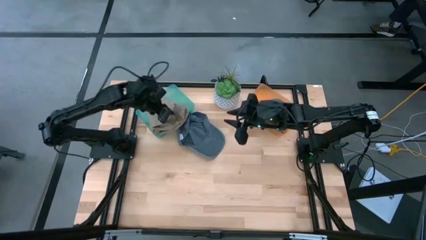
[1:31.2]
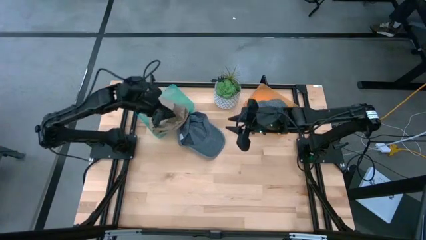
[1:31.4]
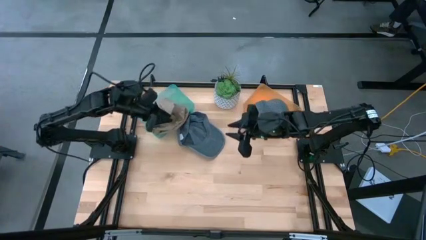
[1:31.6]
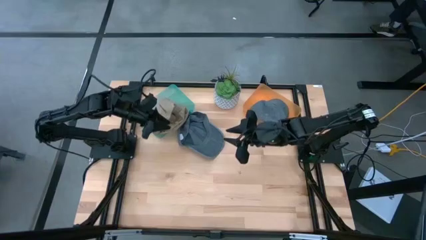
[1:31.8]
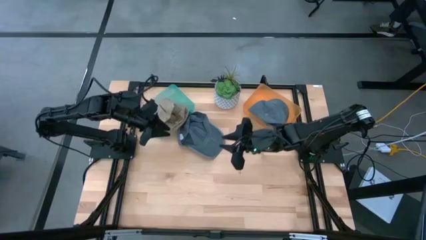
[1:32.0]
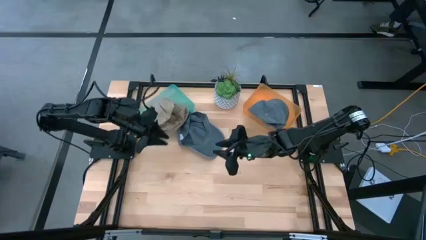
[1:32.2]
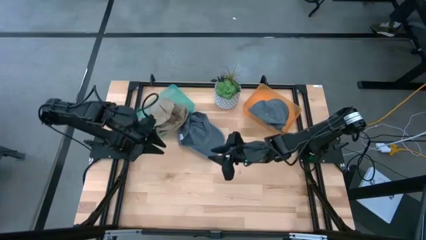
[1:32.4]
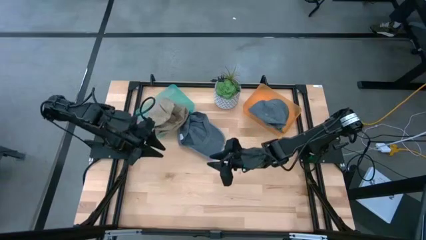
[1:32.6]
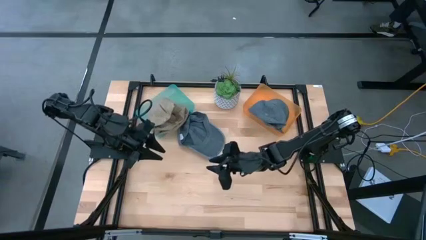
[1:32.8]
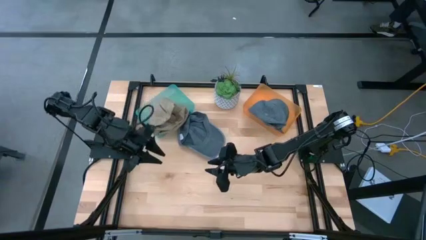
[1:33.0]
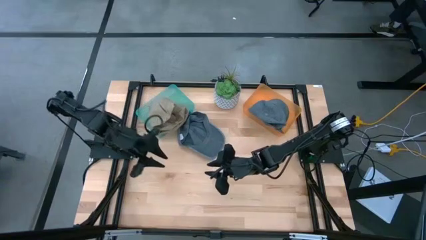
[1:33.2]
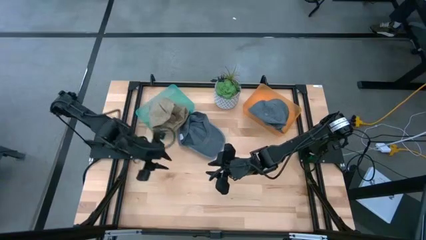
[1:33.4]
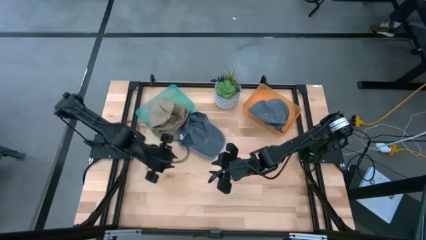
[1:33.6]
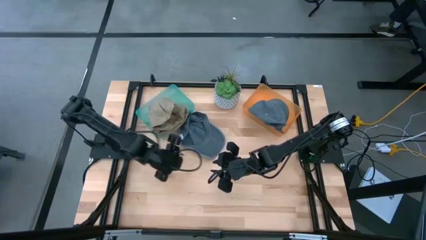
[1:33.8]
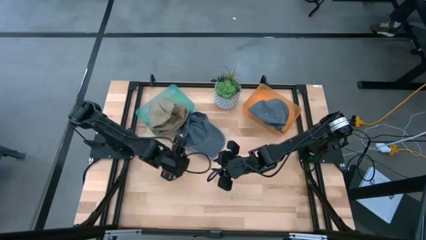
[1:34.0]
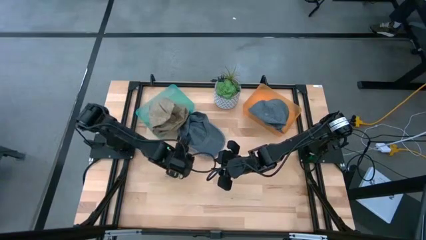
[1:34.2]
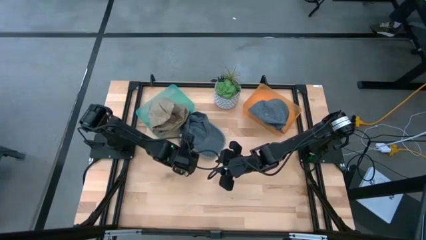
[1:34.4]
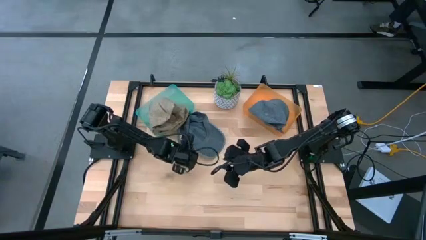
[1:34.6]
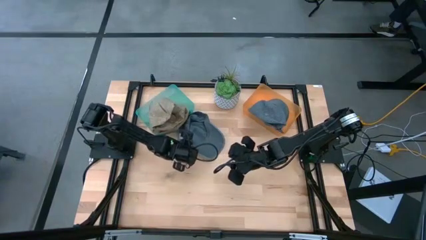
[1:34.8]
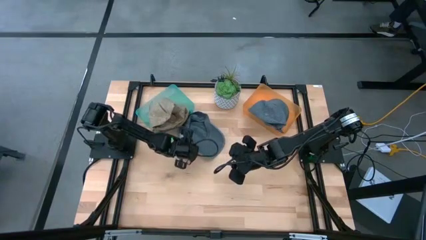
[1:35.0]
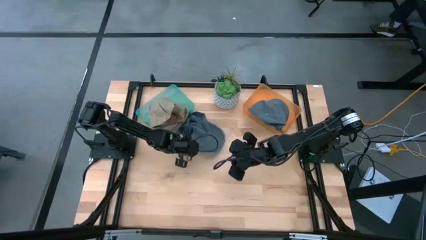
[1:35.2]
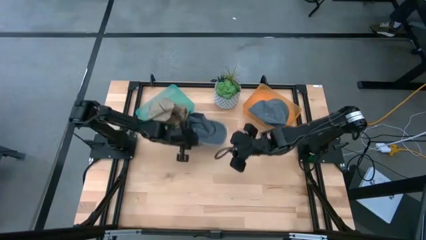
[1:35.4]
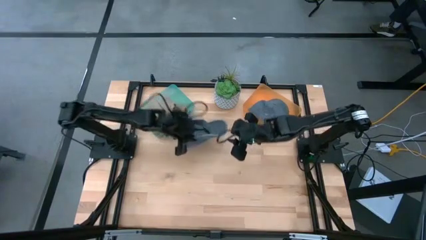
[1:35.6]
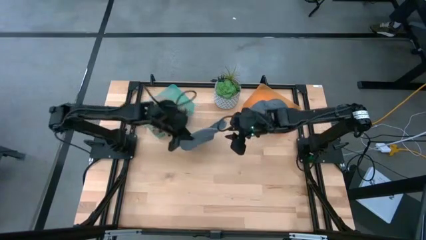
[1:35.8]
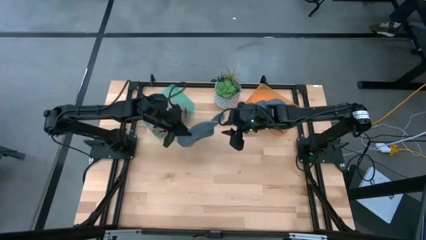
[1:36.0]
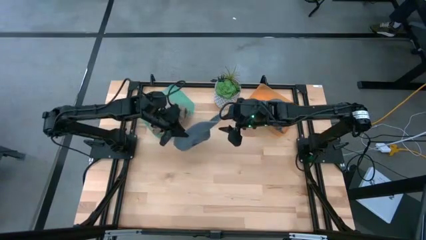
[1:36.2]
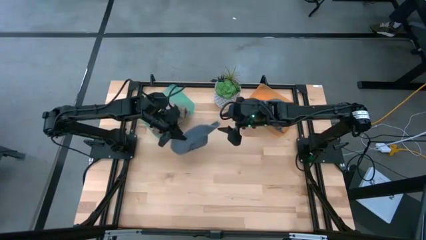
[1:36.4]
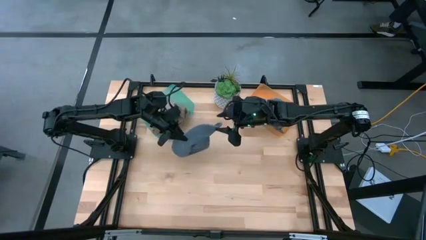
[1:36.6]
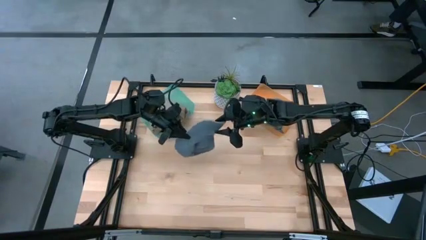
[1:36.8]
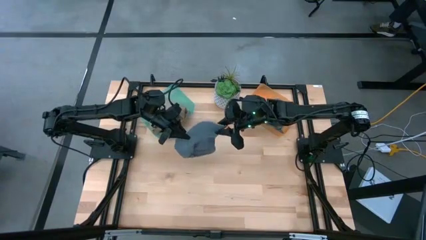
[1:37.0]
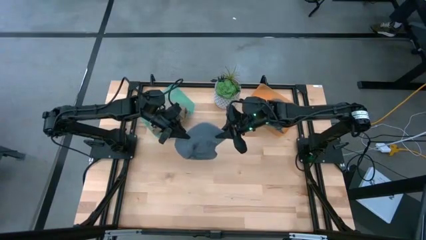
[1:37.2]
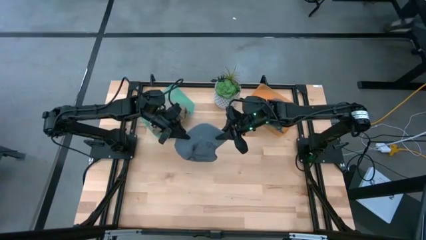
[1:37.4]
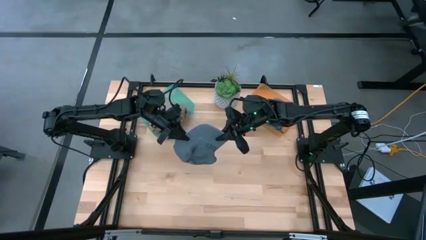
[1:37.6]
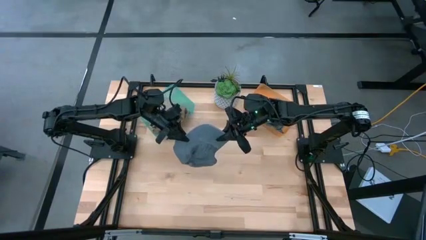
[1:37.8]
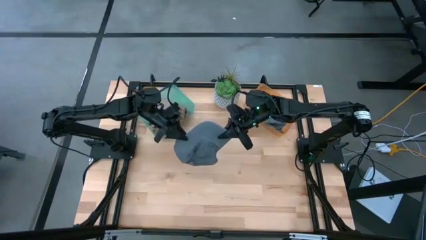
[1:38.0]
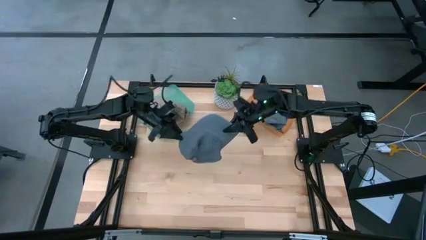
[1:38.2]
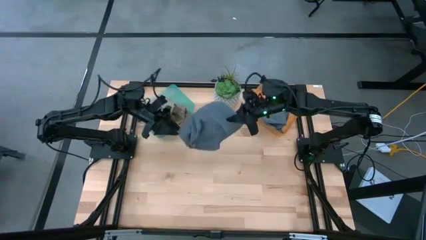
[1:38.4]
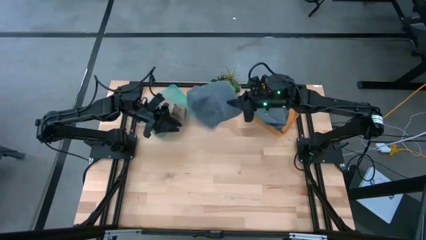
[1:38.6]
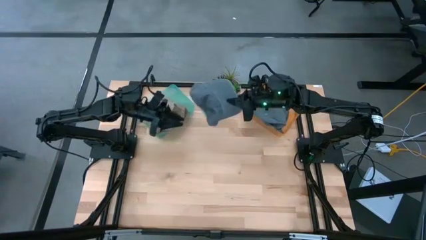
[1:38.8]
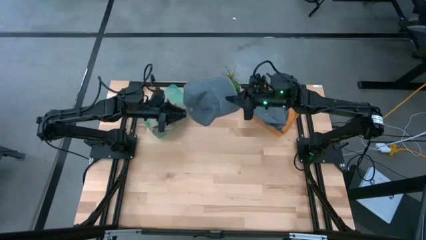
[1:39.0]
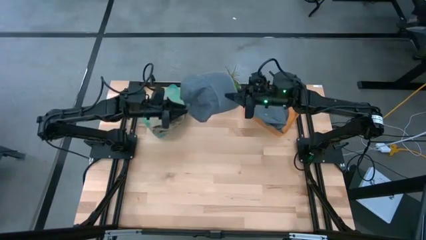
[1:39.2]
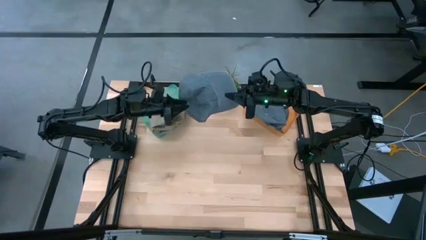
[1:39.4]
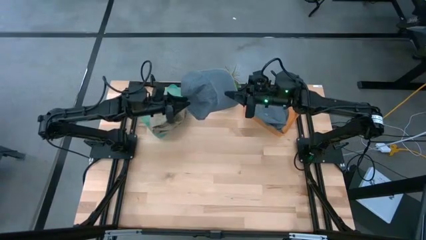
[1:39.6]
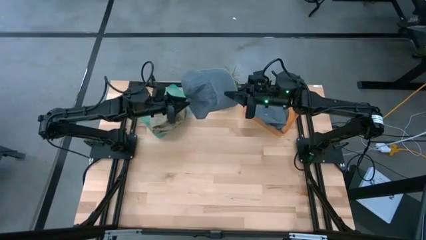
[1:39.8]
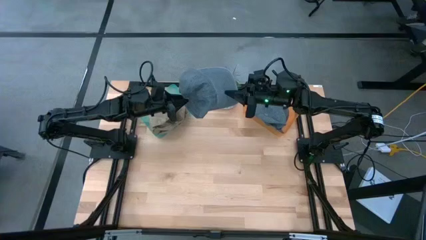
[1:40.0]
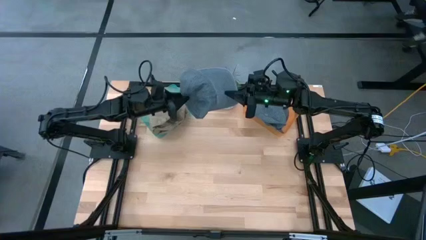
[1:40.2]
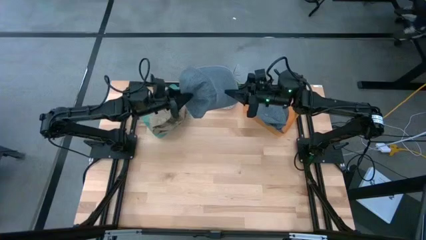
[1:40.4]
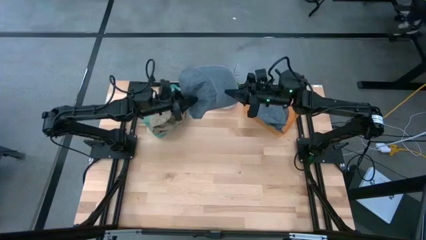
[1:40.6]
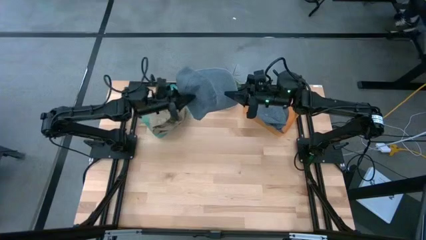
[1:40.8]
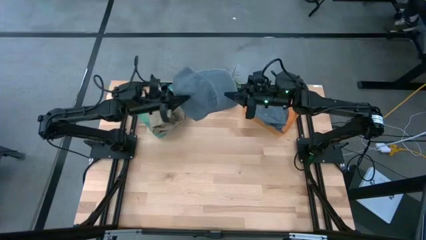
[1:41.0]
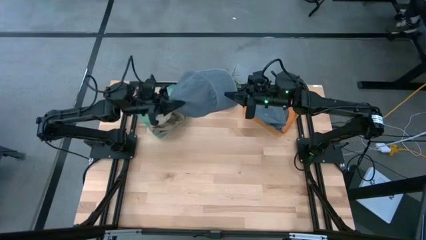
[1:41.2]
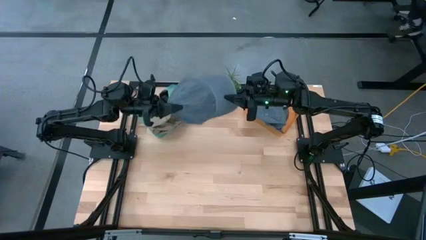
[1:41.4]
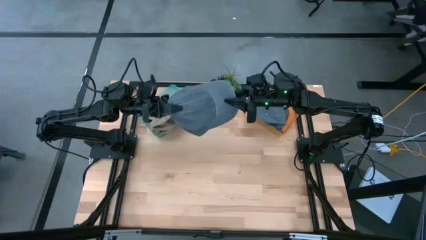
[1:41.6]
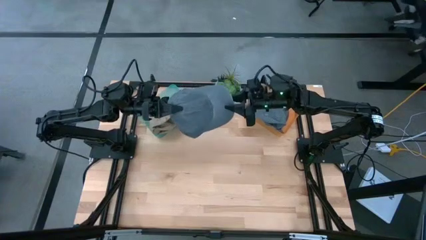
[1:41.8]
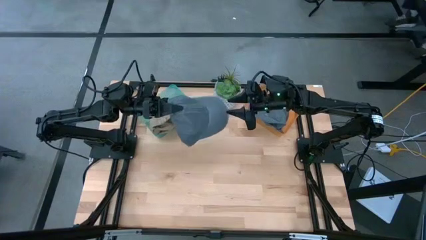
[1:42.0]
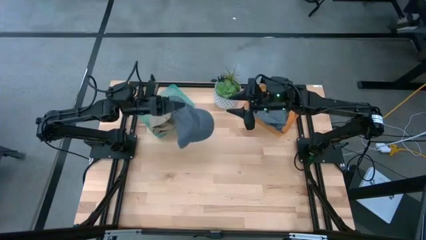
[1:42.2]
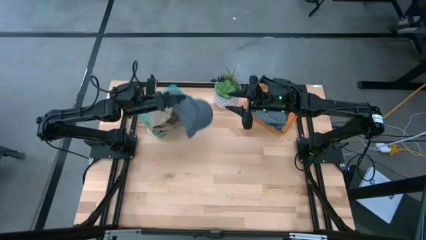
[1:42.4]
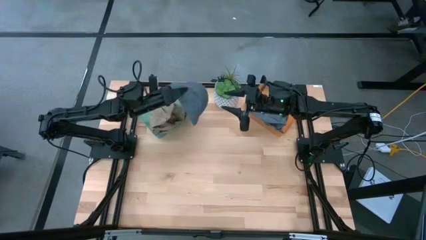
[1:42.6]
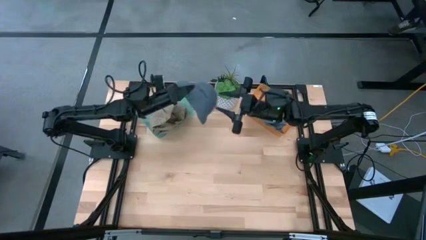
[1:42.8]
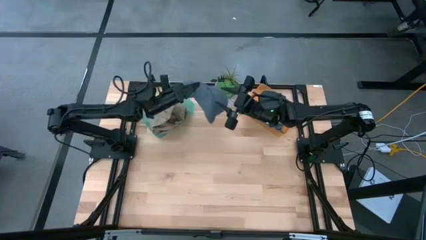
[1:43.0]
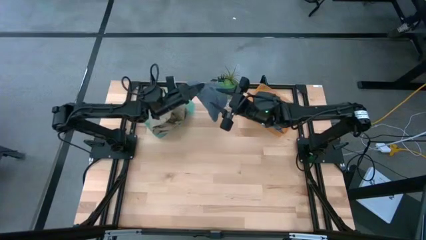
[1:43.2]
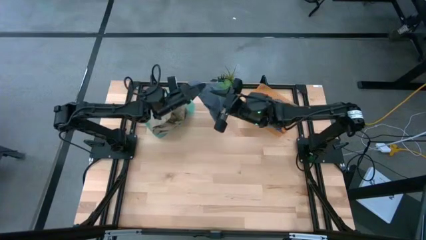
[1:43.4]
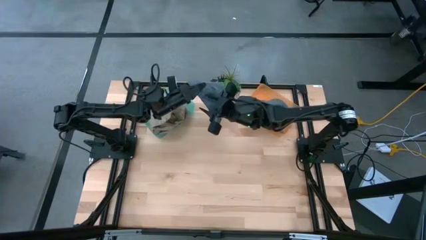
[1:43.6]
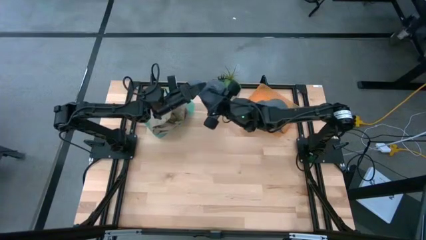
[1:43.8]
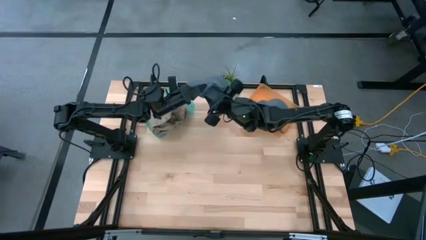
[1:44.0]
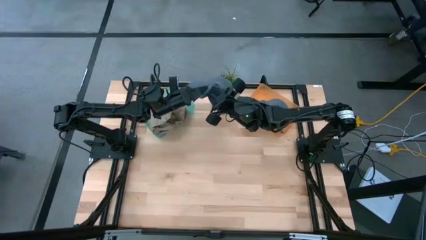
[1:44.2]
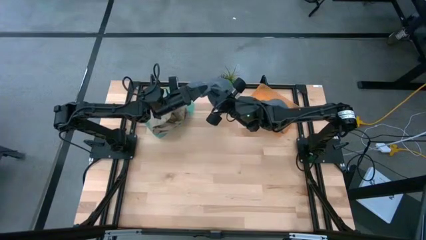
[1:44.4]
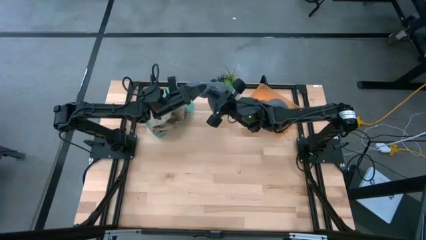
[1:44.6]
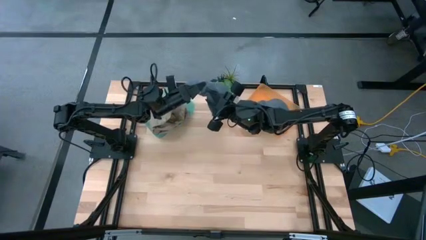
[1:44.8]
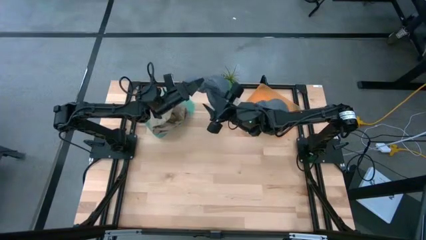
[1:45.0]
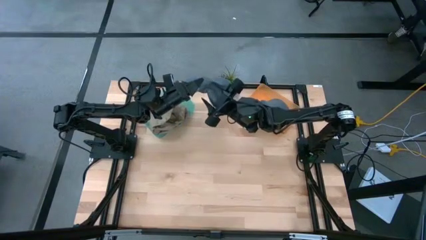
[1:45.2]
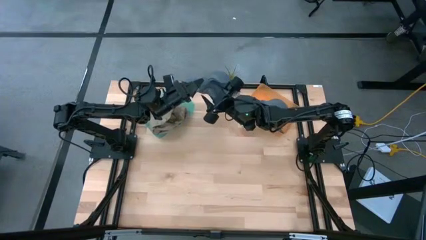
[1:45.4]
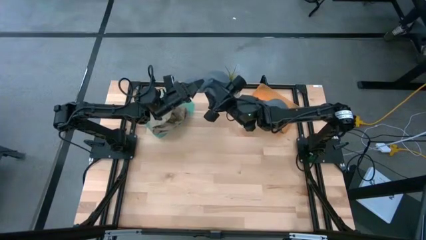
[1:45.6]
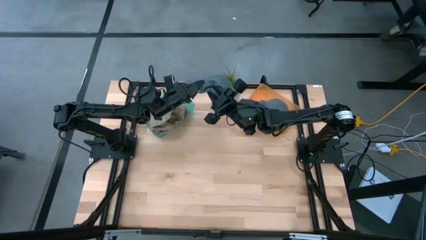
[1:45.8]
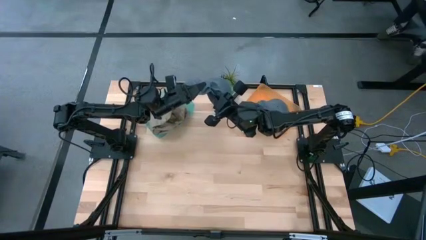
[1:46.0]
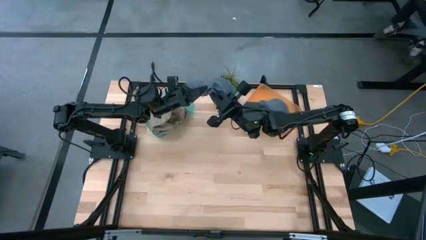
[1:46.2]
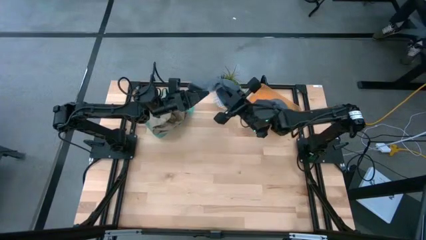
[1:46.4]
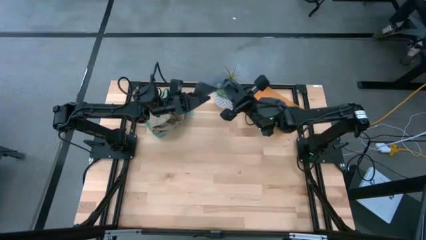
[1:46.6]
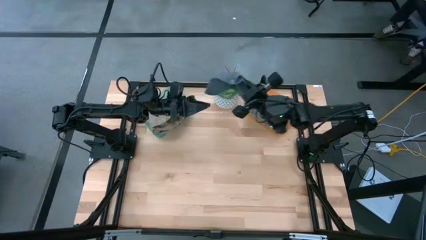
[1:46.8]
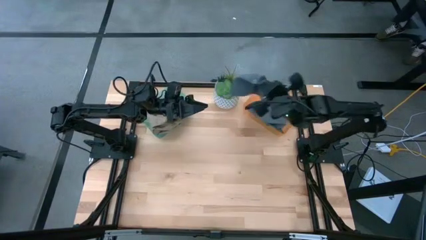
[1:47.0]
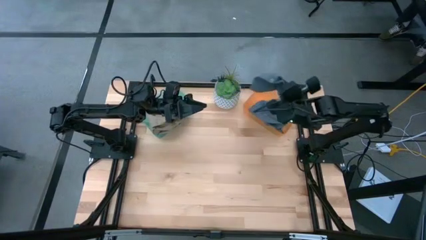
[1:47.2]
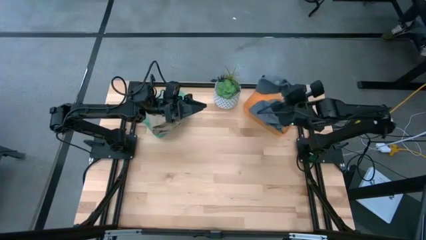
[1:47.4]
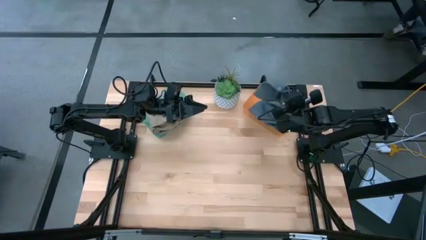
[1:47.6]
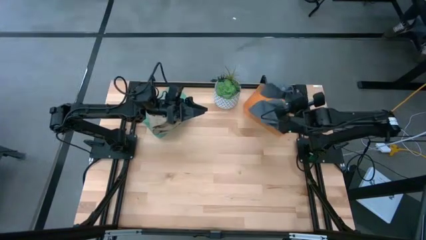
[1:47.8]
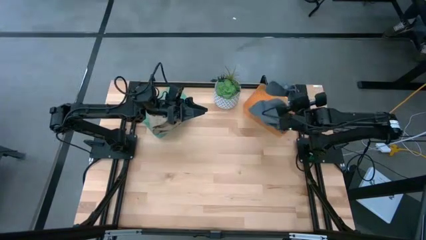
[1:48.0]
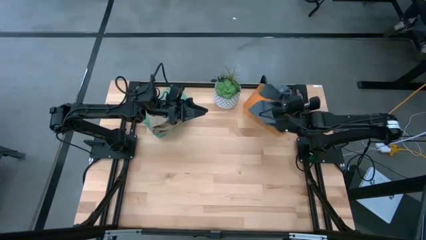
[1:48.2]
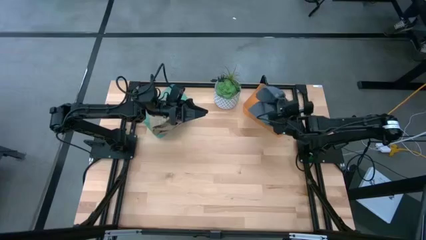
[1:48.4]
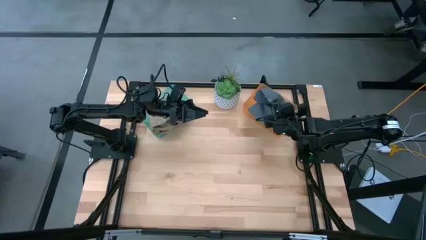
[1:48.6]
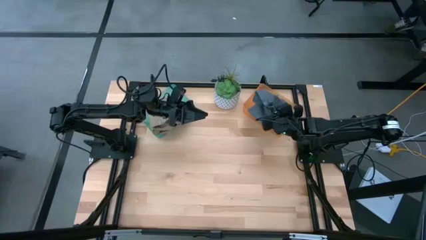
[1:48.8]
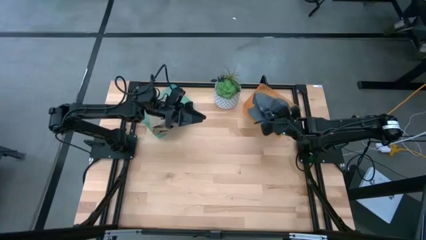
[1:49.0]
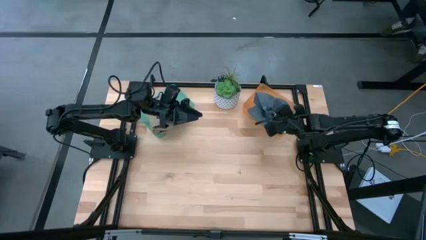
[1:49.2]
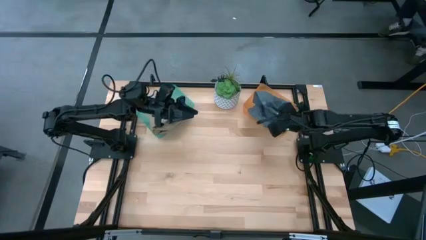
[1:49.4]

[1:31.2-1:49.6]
Task: Pick & Place hat
Put the blue cap into the orange bin
